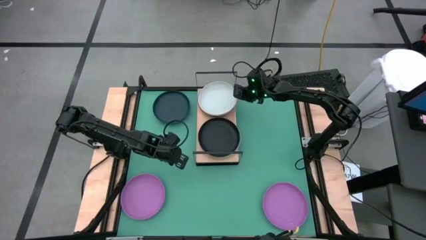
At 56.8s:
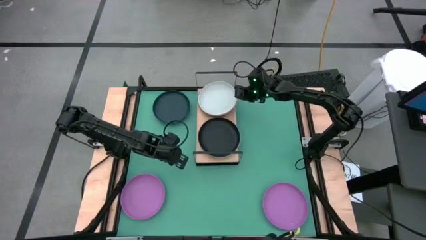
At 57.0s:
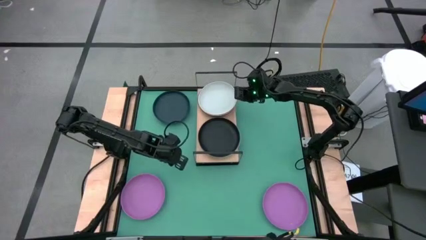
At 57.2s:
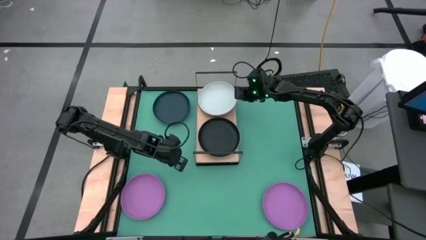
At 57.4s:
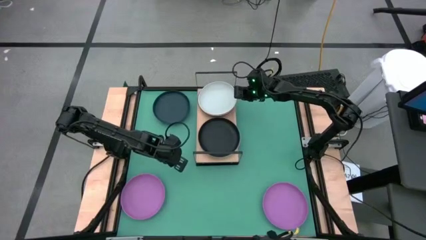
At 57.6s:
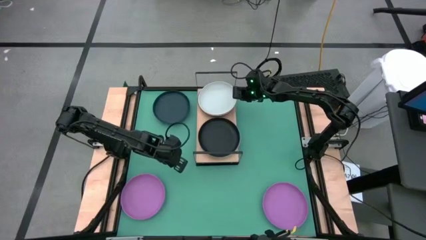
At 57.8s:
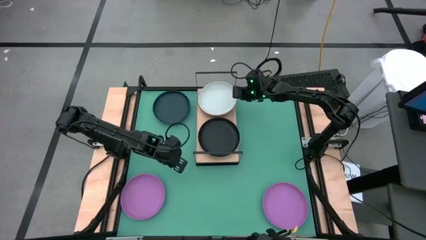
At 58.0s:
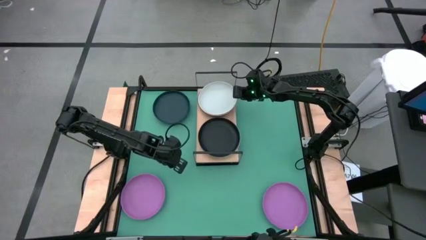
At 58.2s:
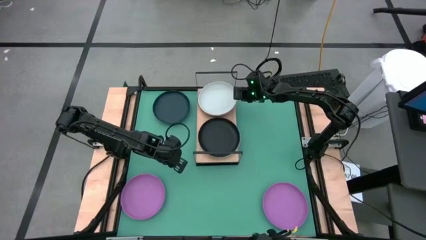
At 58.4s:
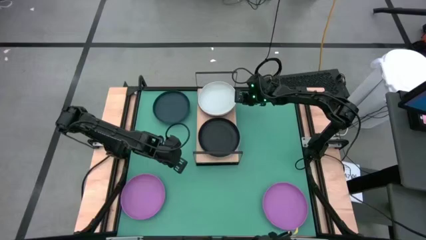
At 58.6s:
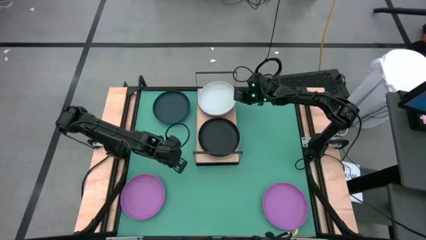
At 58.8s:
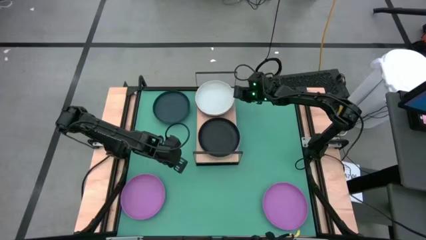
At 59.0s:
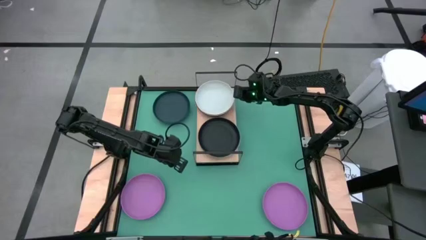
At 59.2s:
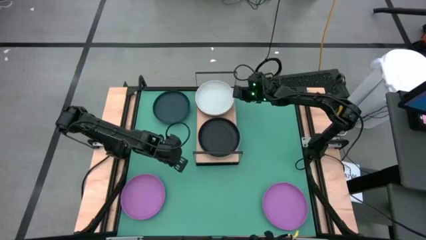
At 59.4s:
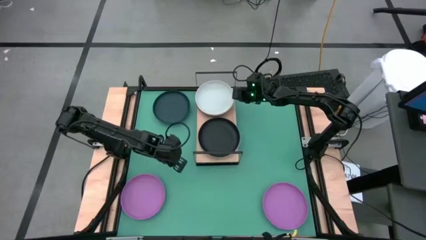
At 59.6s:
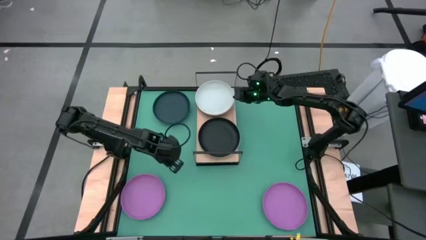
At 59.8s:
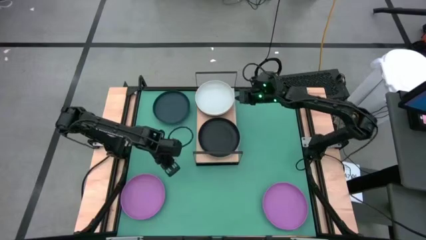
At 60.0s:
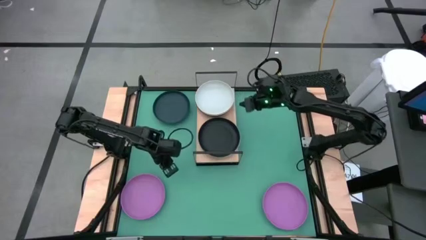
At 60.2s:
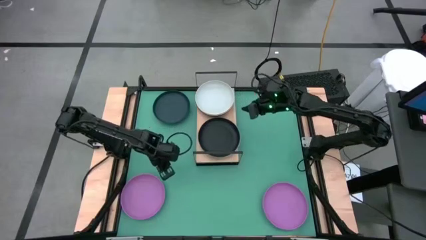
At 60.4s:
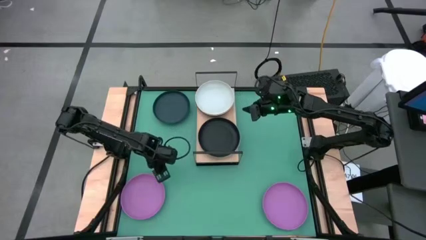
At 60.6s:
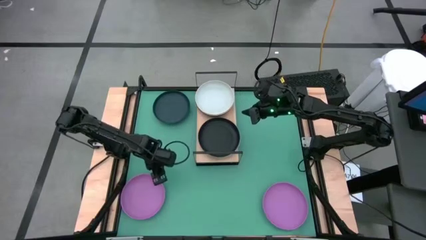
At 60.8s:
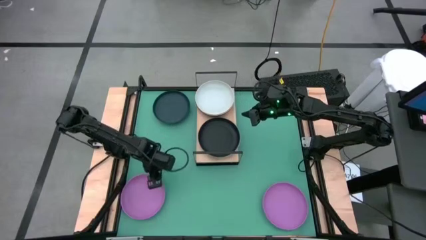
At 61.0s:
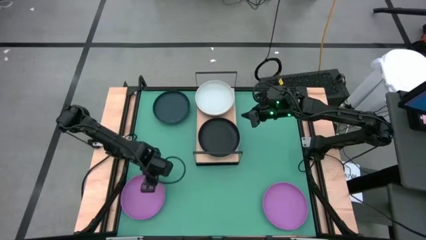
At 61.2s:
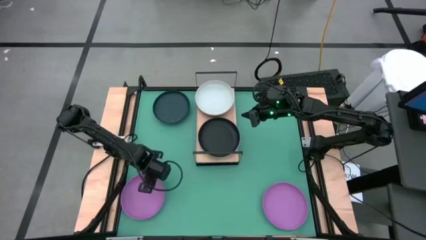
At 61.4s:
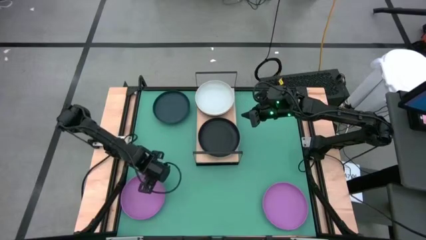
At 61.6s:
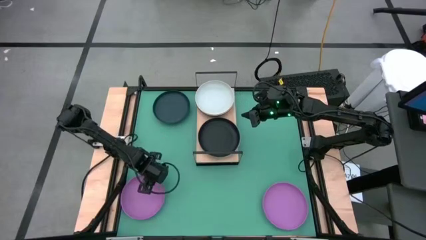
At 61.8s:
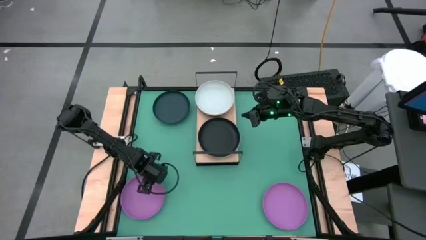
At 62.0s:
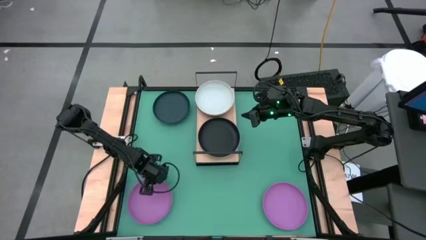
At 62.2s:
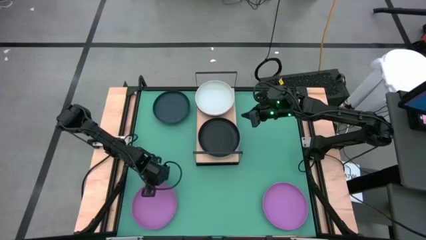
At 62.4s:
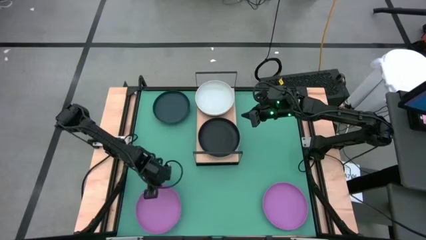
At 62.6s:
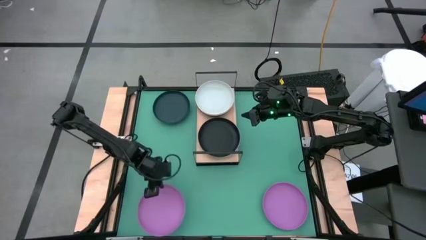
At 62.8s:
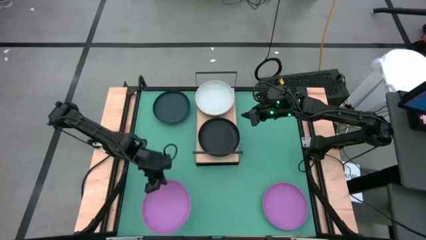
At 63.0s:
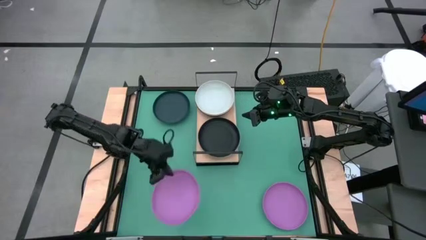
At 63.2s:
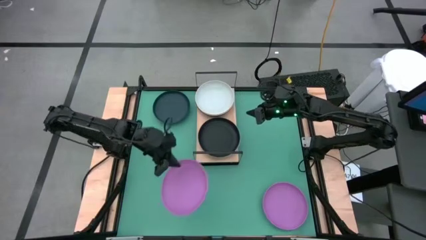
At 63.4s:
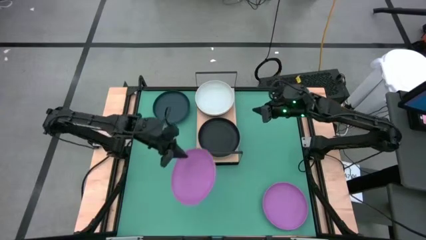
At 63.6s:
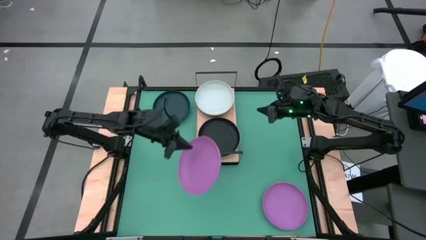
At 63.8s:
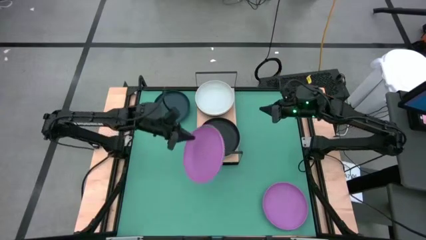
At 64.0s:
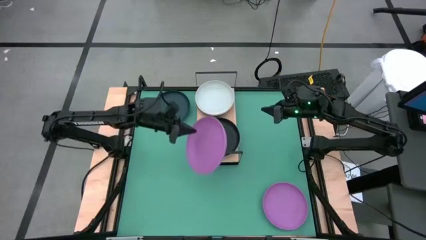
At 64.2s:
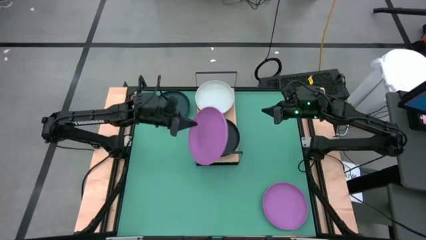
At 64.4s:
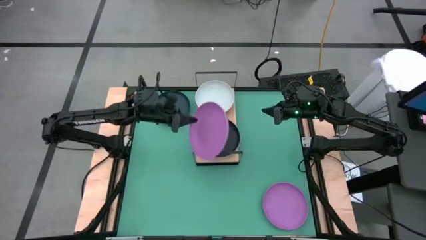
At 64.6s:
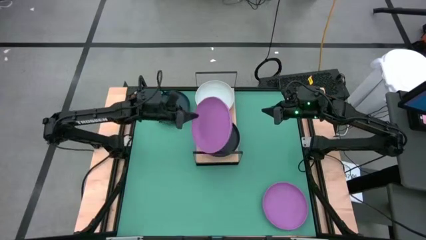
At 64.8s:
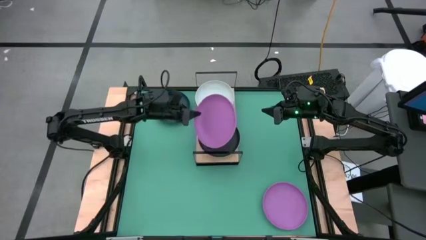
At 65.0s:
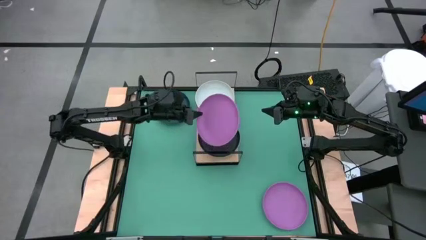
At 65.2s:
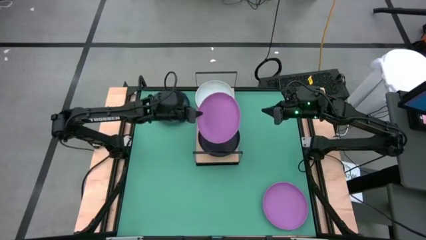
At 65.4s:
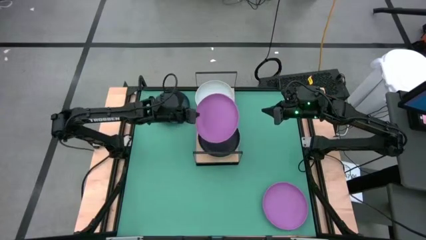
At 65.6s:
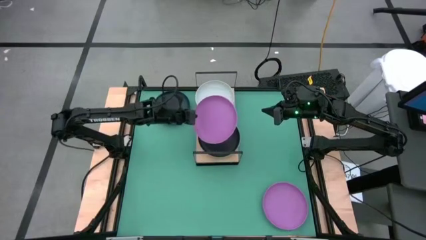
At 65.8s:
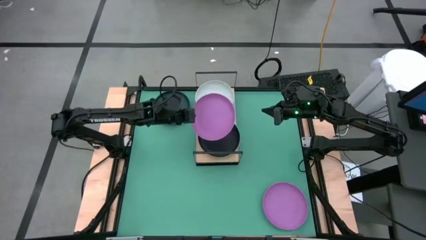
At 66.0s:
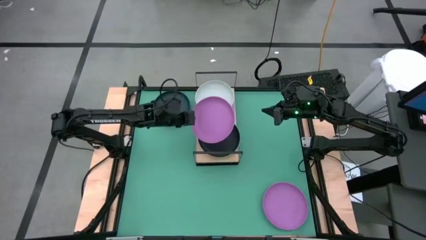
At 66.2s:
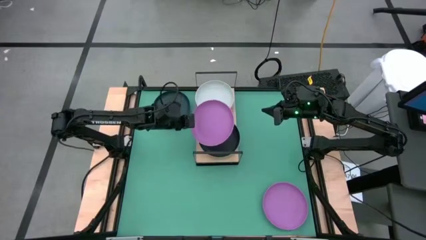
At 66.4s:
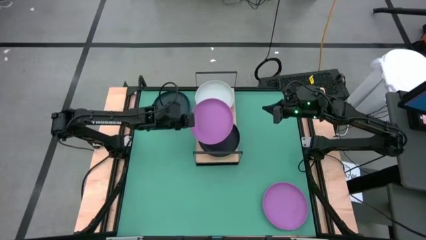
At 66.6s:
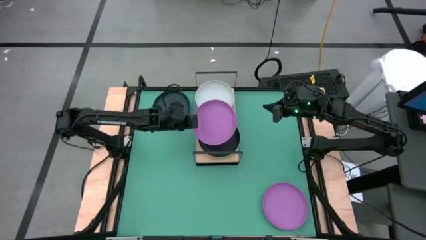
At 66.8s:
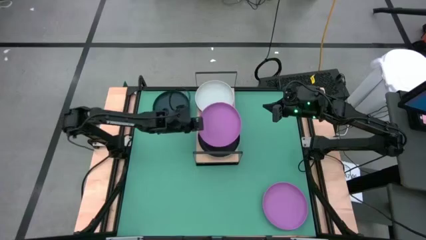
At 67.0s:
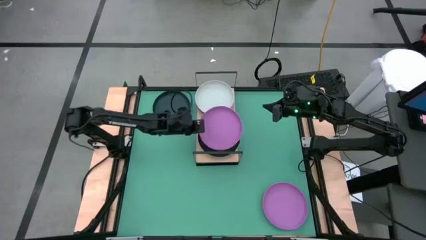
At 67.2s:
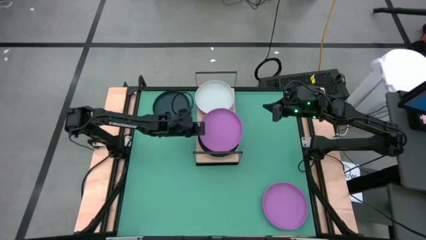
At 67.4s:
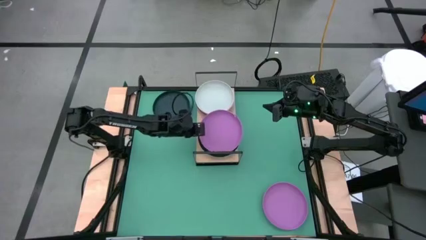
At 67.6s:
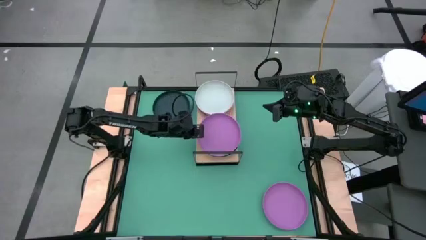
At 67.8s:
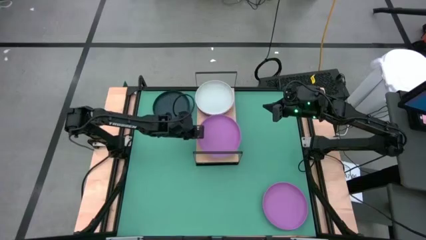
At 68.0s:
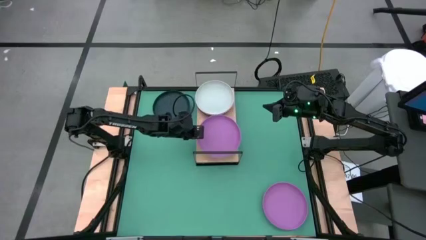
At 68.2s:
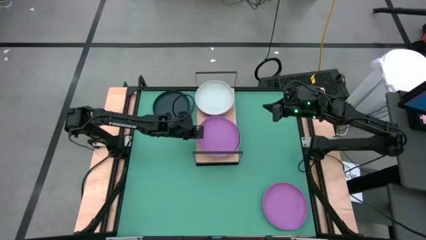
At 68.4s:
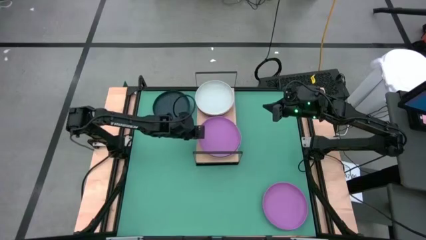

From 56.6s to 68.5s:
Task: Place and stack plates onto a shelf
Stack the left purple plate on top of the black plate on the shelf
